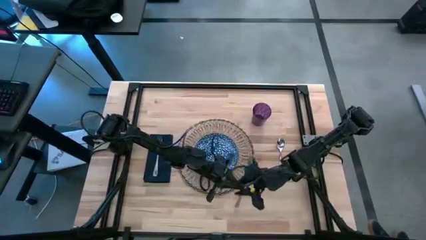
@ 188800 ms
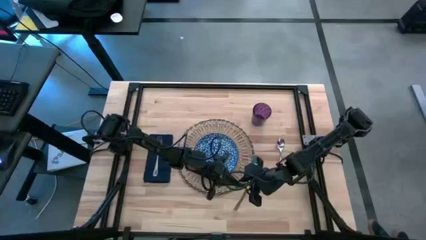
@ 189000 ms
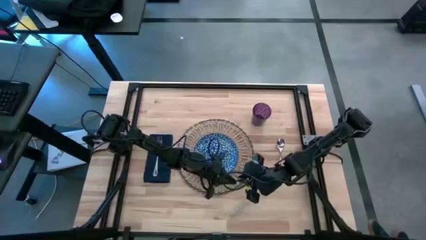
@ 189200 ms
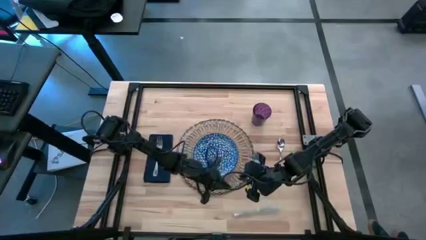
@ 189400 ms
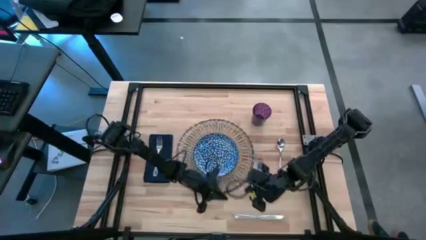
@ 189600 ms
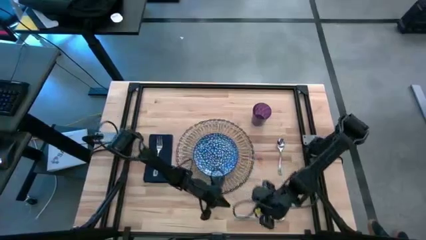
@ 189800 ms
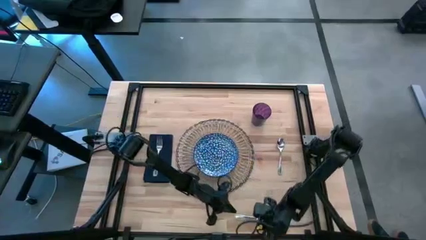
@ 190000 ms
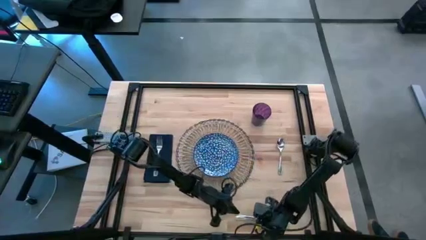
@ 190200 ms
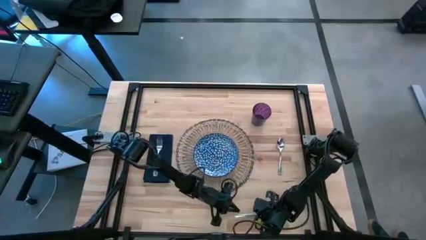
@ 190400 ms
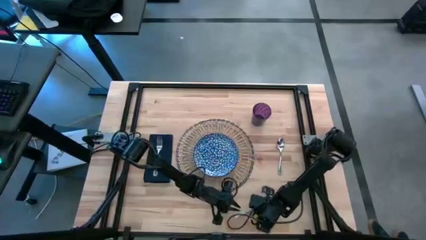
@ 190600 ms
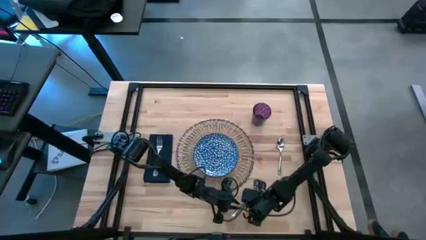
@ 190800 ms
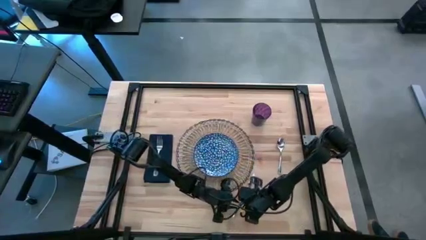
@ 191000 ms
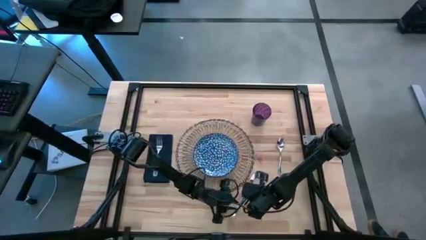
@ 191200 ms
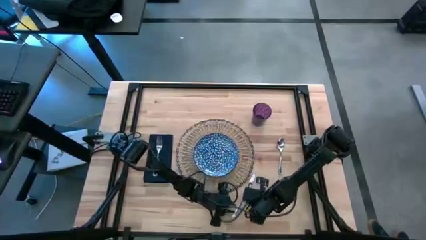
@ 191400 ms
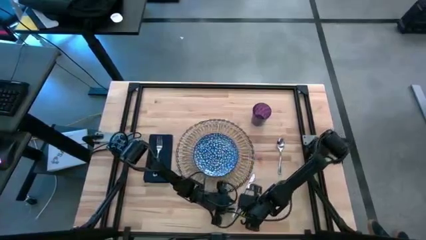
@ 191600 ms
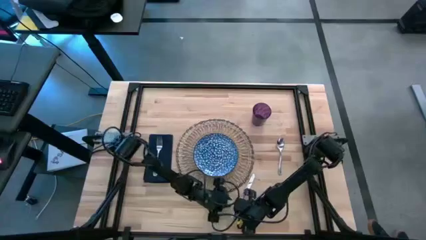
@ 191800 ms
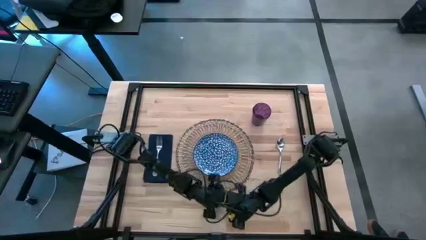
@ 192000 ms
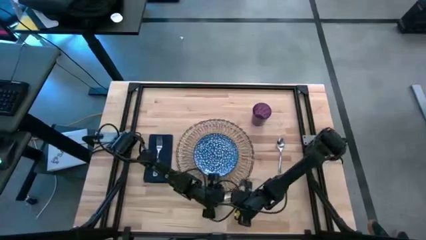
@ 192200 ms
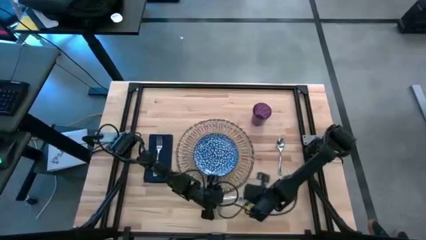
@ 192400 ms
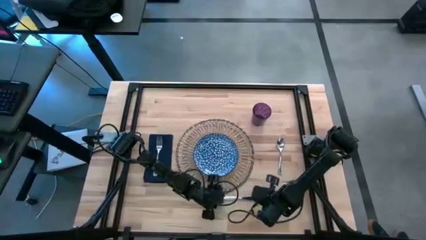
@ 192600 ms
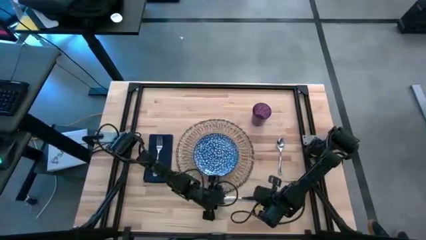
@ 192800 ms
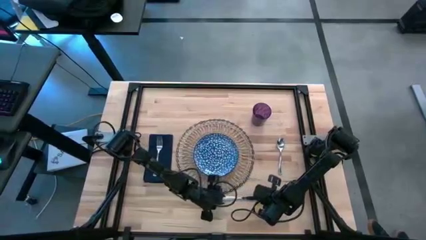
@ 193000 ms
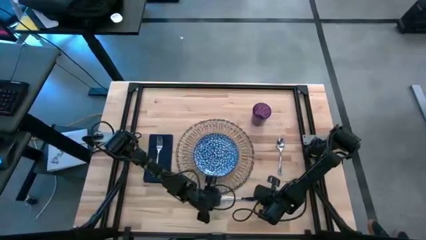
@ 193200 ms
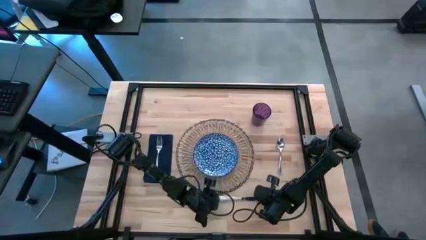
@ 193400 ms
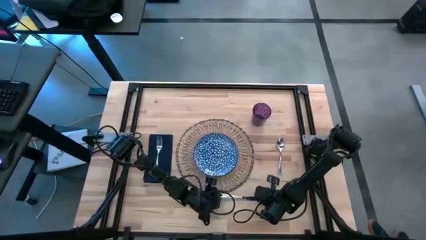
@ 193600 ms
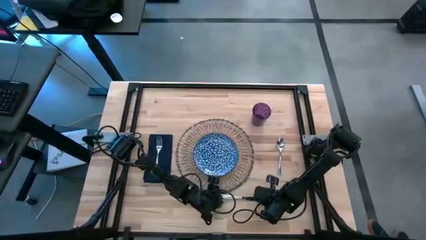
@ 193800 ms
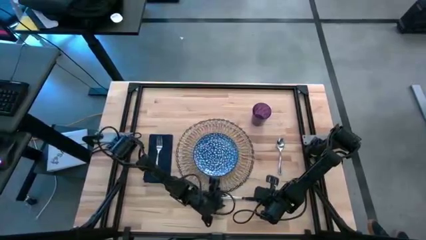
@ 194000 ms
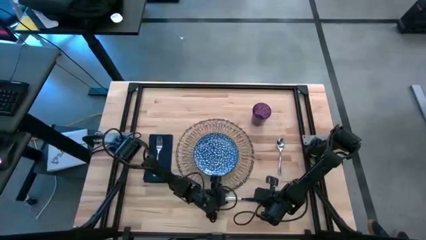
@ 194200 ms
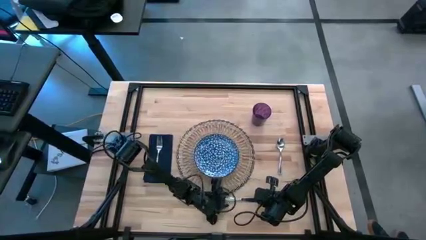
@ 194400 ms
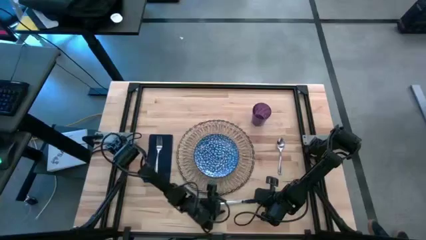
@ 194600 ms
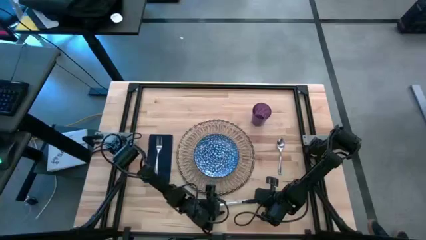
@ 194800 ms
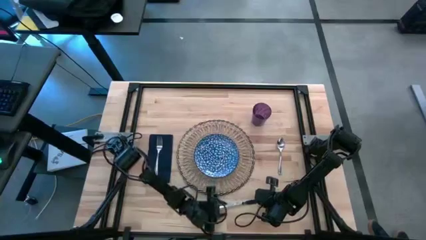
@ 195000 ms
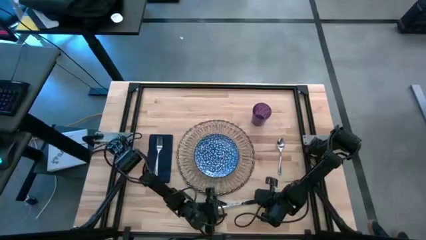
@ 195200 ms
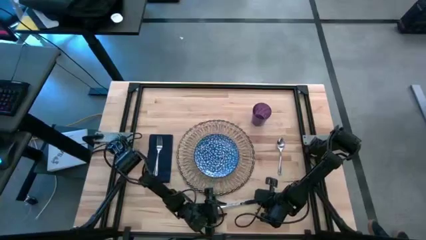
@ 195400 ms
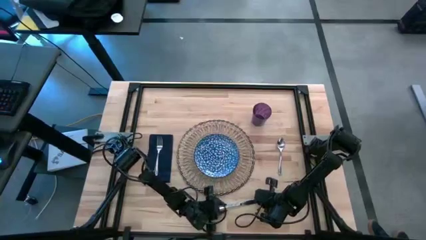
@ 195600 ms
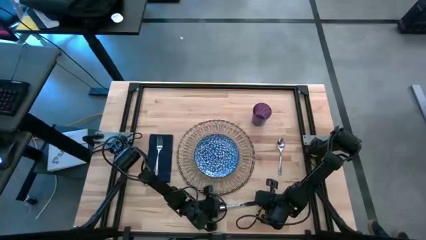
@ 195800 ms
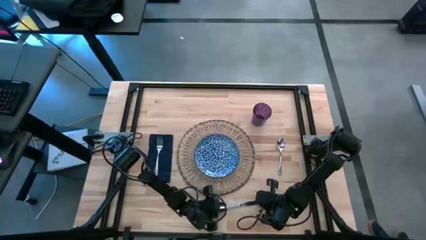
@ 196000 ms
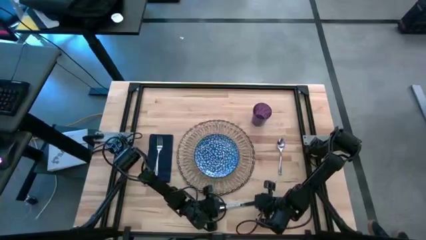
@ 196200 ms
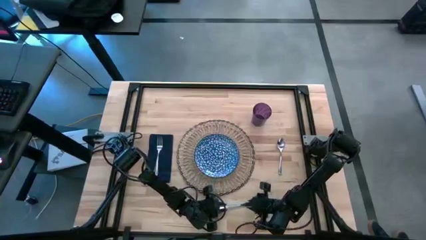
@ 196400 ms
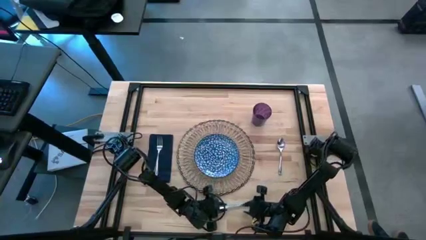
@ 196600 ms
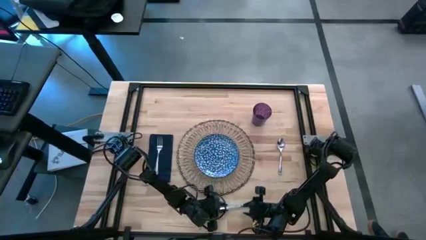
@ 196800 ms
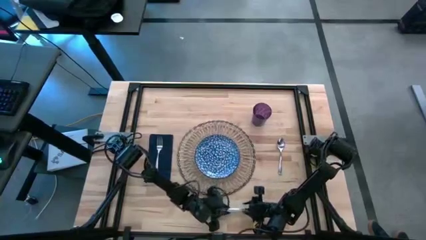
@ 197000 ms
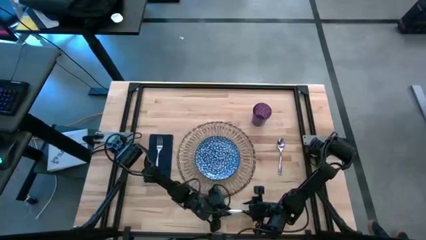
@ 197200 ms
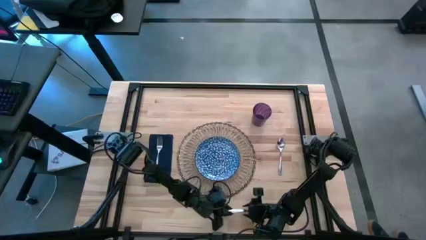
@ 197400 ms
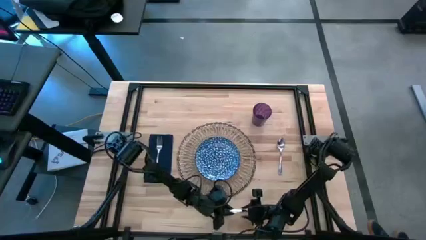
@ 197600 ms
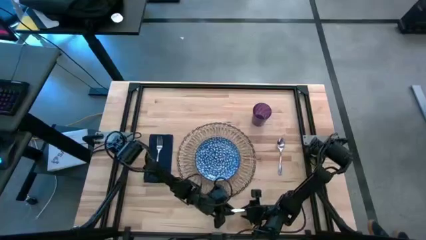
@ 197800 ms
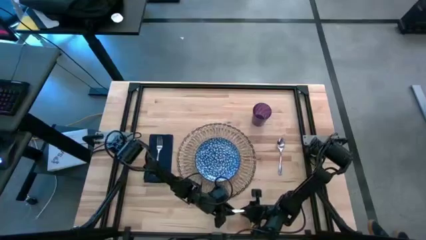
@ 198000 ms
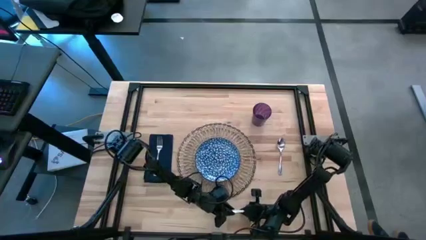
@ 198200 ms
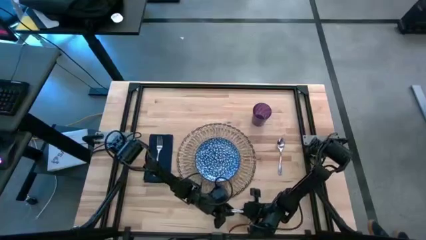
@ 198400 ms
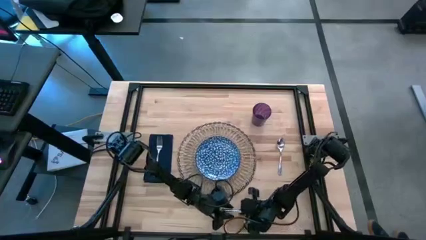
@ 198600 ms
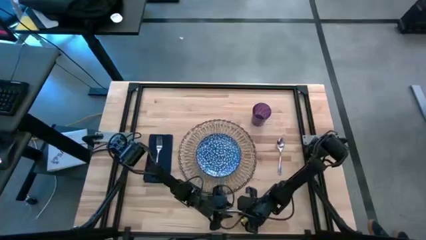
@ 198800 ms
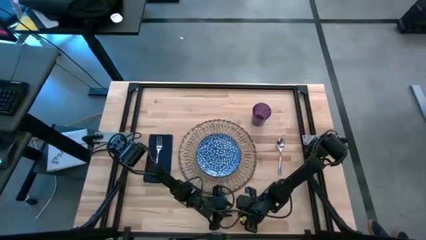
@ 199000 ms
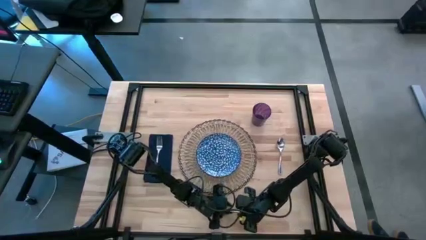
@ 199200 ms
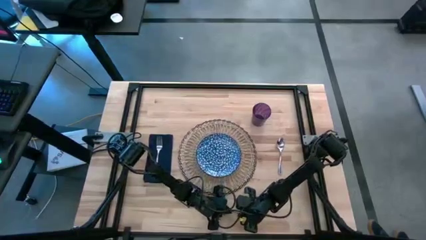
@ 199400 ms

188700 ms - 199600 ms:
Task: Set table place
Move the silver knife to the left of the silver spoon on the table

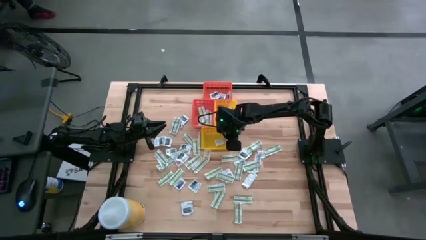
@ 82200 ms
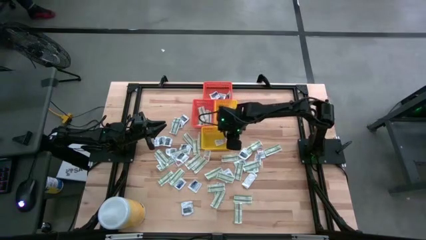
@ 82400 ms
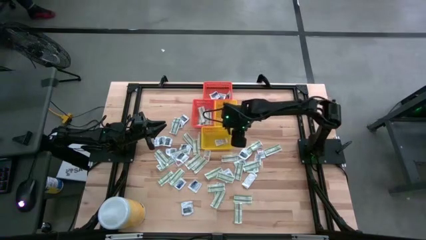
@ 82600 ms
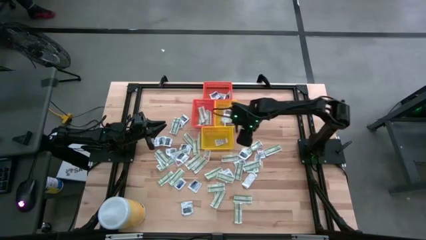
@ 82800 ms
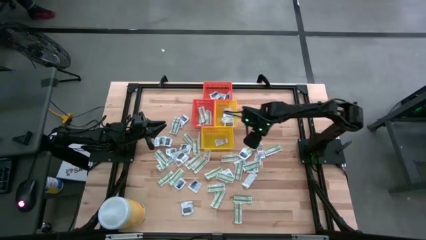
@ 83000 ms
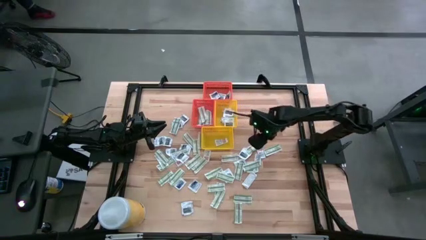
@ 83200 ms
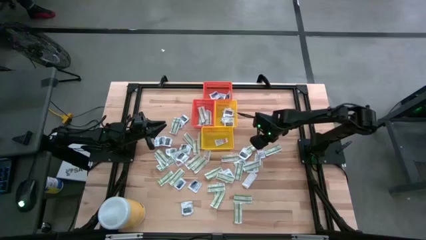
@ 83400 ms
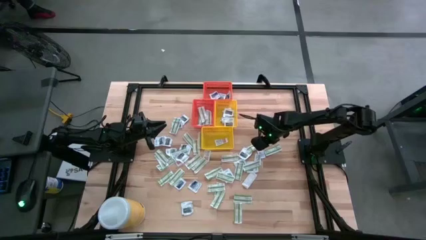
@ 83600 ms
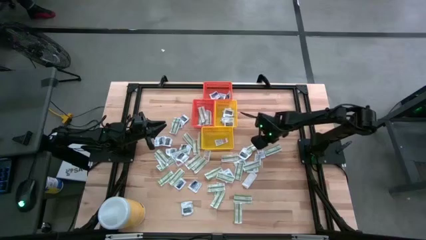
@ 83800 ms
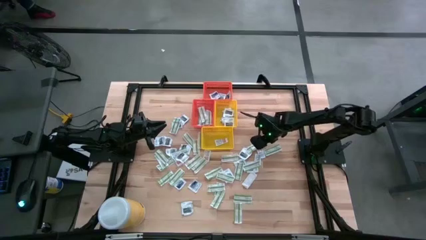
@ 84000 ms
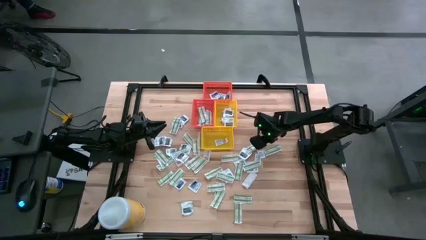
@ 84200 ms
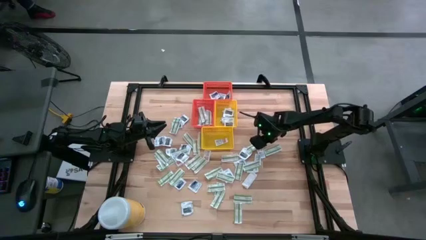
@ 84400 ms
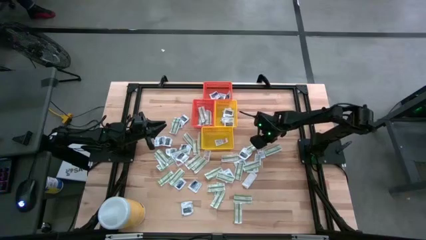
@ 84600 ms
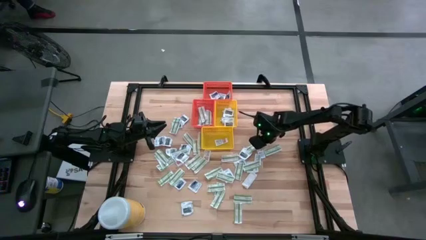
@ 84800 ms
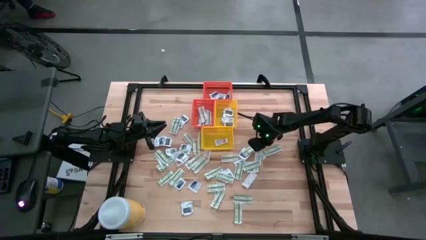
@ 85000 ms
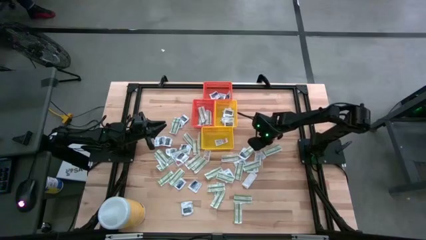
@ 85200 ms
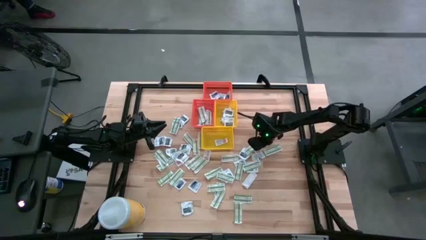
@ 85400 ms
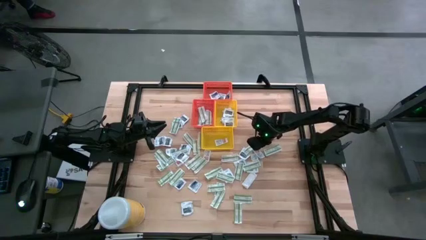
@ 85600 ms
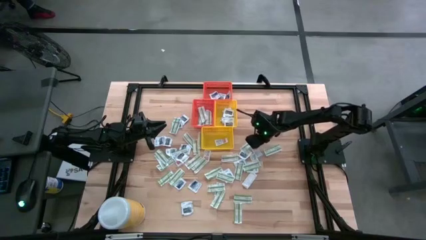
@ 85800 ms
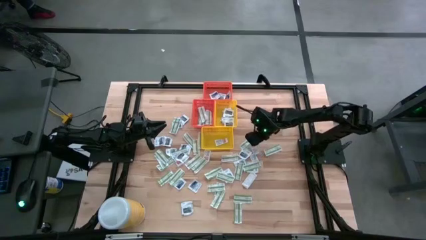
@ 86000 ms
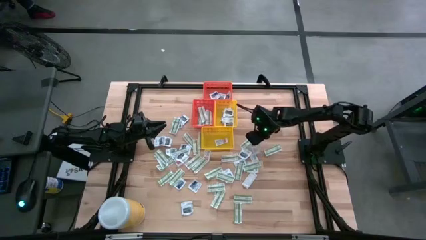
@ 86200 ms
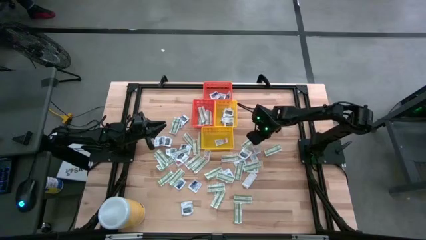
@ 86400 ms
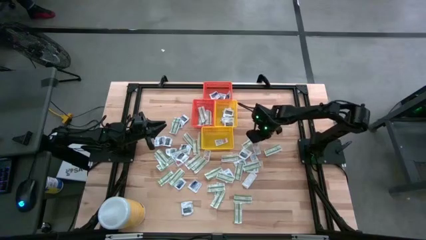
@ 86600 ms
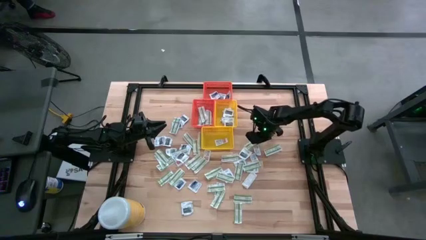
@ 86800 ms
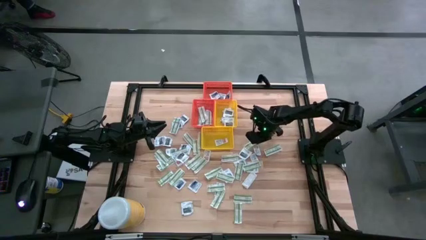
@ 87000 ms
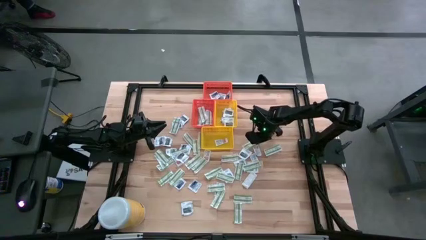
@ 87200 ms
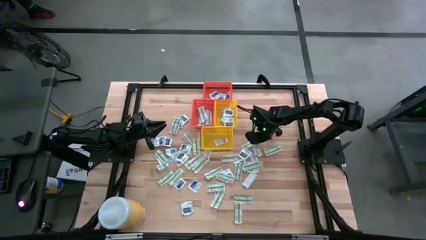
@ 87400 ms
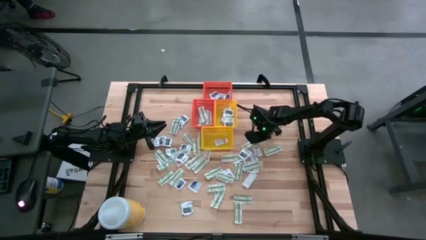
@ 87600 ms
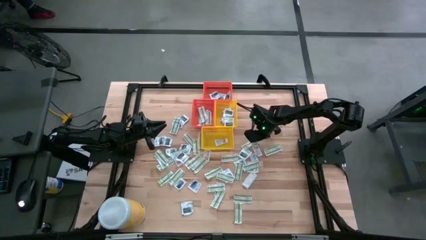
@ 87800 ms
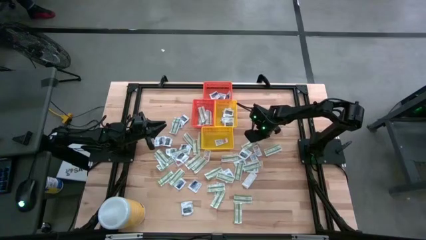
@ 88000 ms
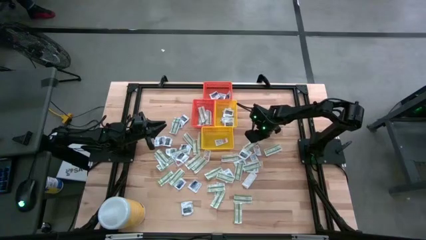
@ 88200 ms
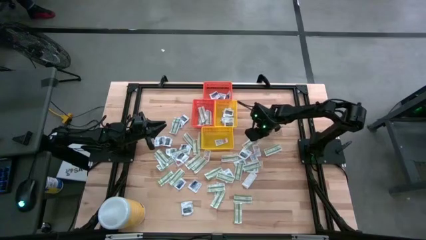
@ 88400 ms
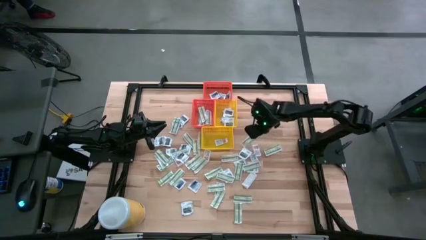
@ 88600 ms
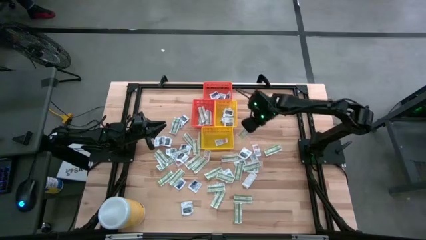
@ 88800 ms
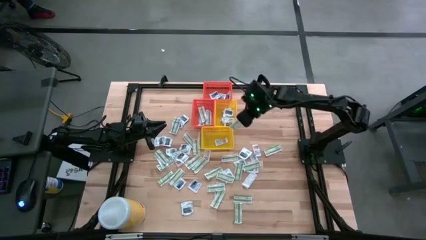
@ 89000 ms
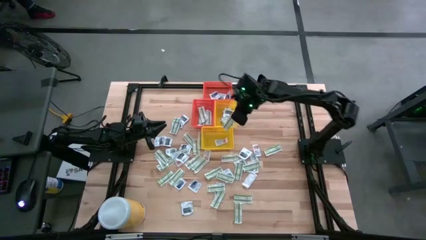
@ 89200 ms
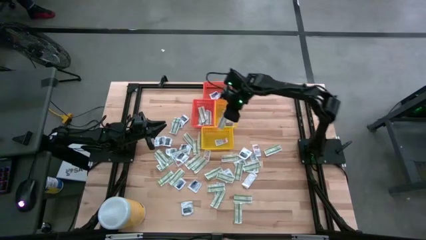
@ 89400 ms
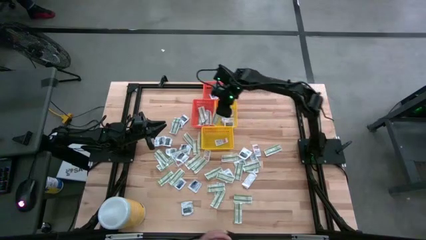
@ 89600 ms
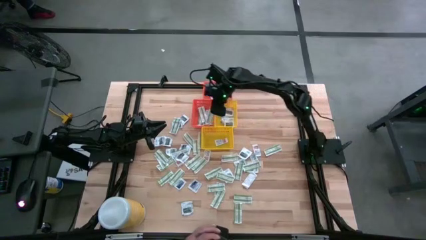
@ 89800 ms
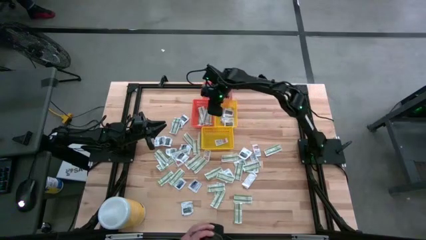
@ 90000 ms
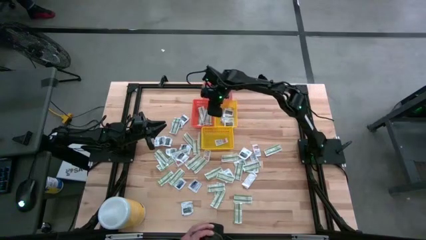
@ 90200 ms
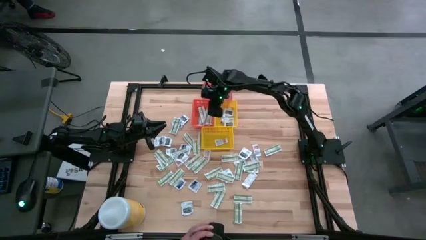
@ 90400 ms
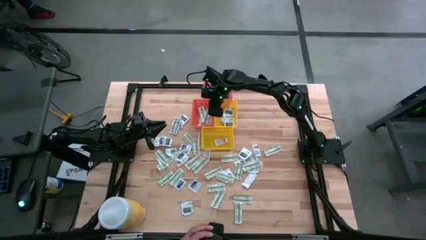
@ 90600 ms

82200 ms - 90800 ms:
Task: Pick & Place First Aid Supplies
Put the bandage into the bottom orange bin
